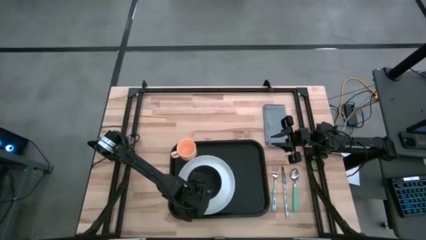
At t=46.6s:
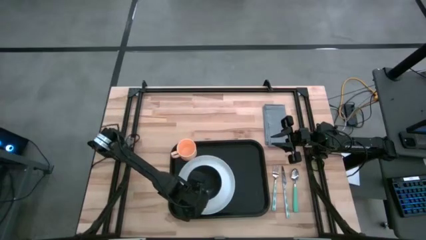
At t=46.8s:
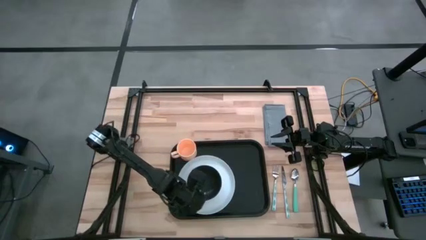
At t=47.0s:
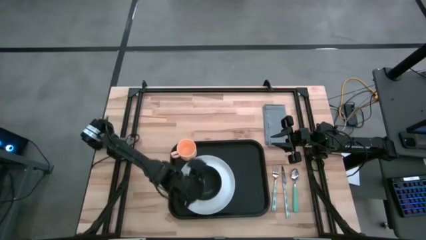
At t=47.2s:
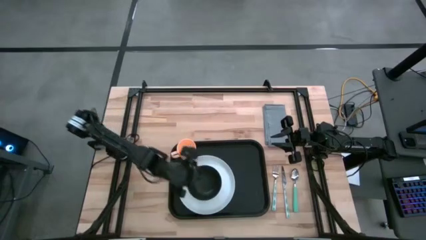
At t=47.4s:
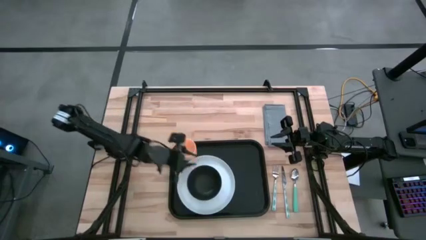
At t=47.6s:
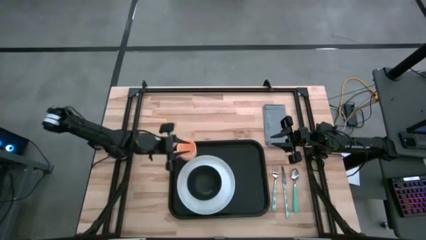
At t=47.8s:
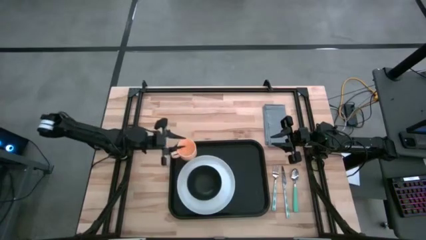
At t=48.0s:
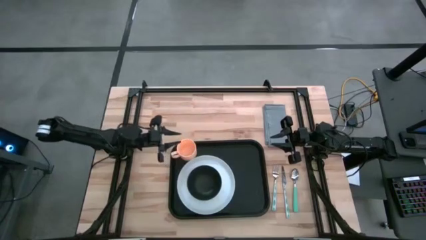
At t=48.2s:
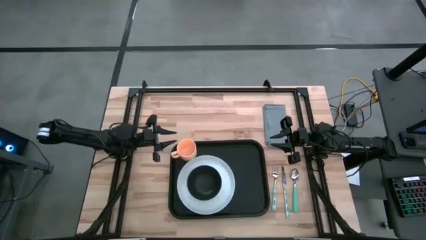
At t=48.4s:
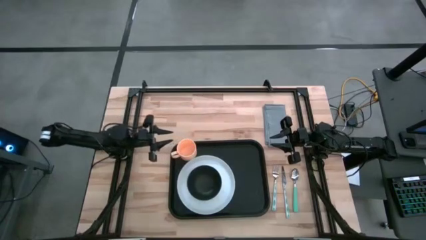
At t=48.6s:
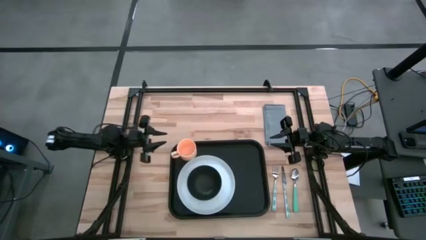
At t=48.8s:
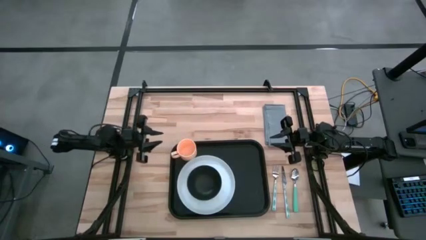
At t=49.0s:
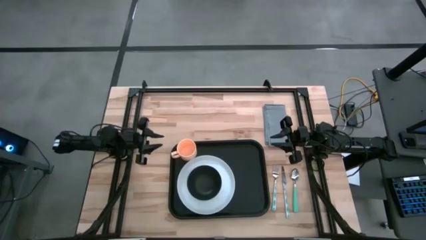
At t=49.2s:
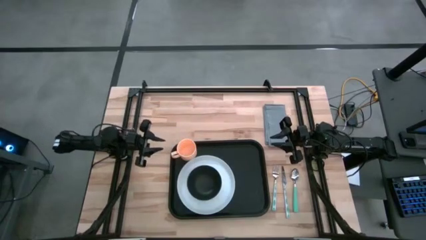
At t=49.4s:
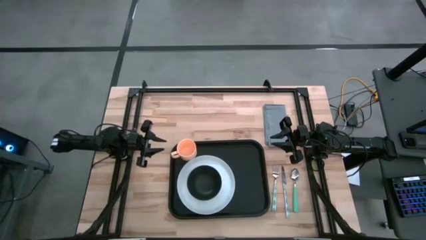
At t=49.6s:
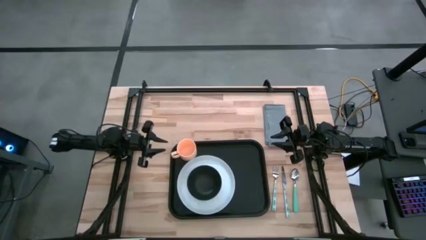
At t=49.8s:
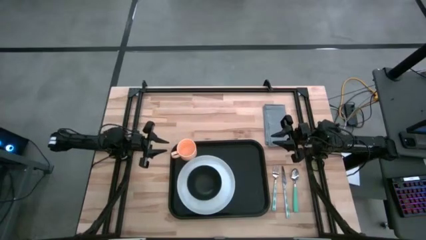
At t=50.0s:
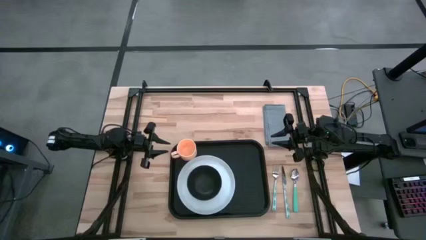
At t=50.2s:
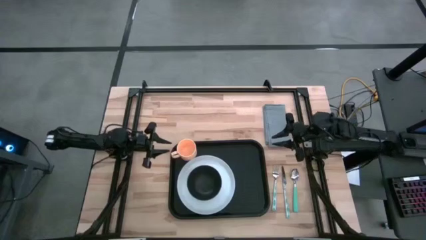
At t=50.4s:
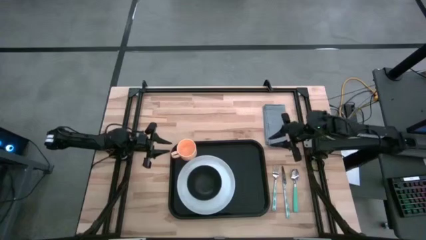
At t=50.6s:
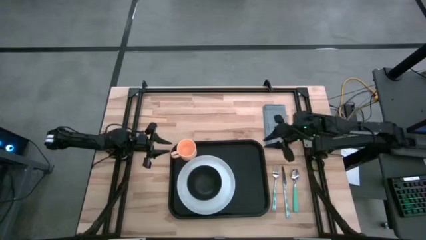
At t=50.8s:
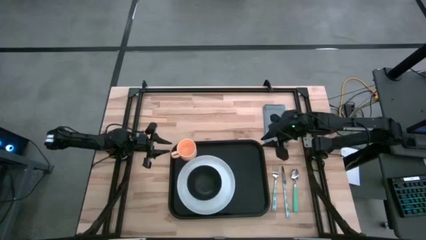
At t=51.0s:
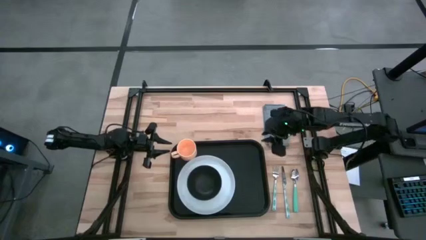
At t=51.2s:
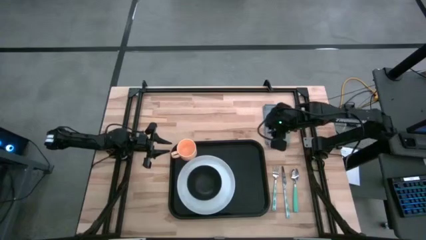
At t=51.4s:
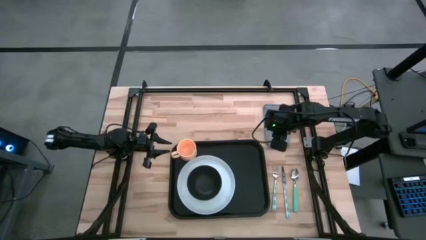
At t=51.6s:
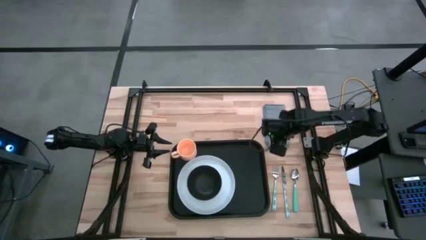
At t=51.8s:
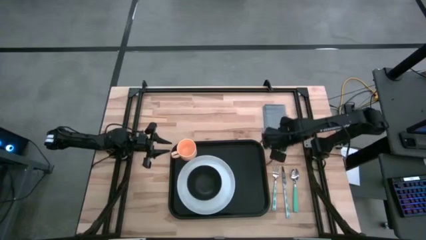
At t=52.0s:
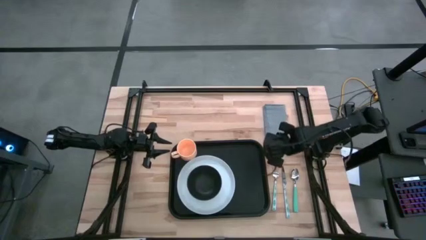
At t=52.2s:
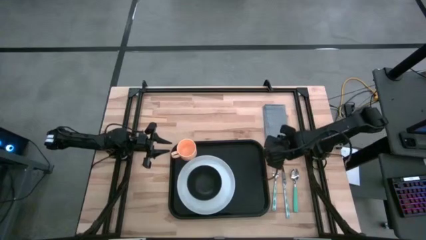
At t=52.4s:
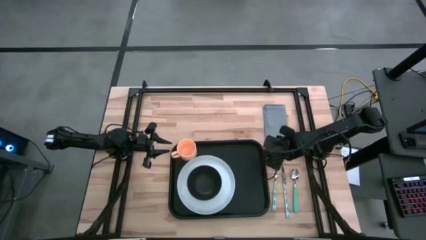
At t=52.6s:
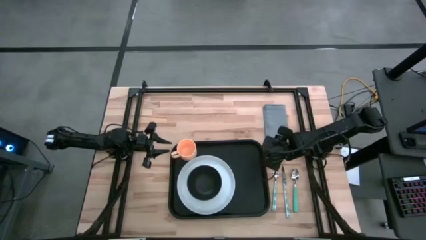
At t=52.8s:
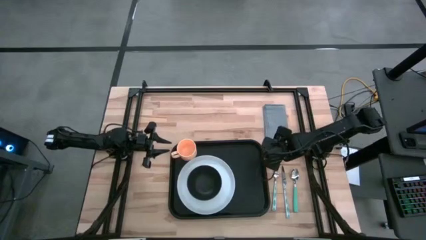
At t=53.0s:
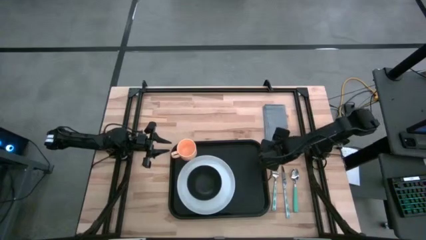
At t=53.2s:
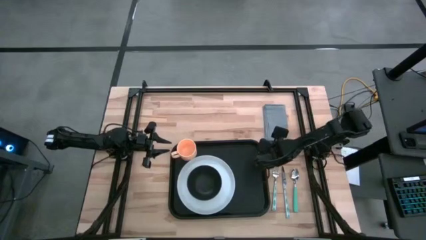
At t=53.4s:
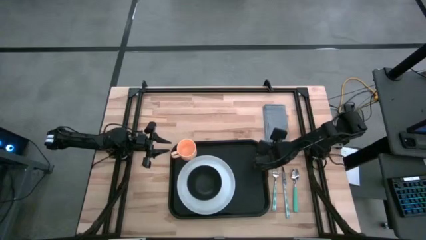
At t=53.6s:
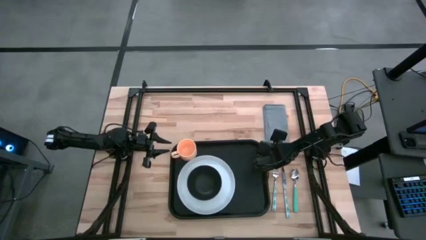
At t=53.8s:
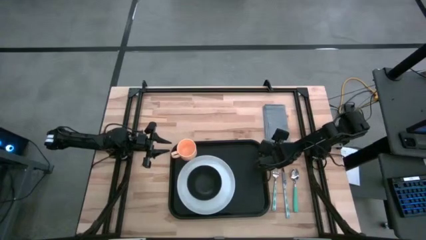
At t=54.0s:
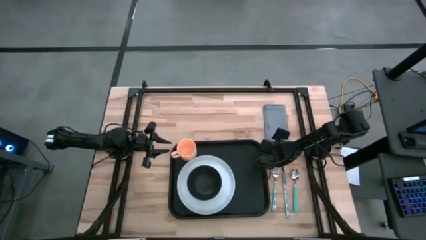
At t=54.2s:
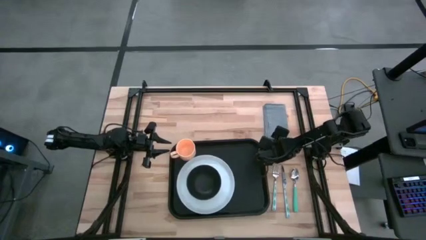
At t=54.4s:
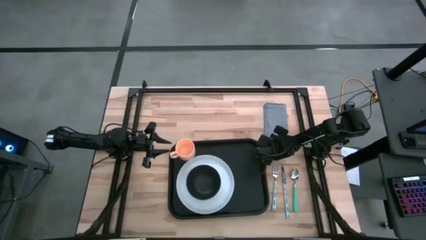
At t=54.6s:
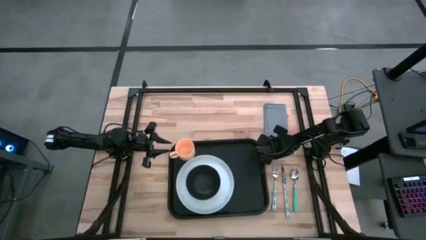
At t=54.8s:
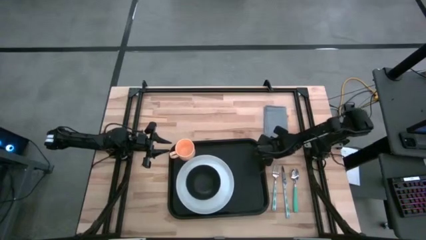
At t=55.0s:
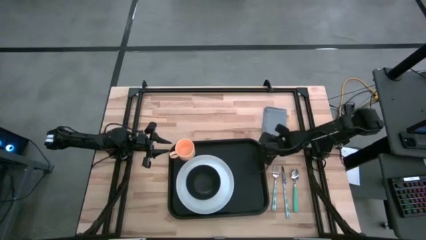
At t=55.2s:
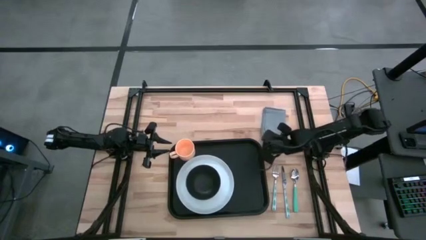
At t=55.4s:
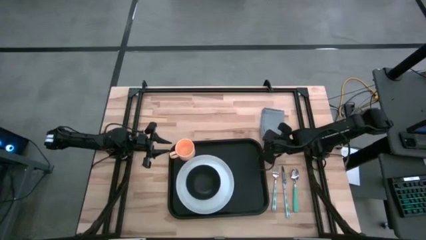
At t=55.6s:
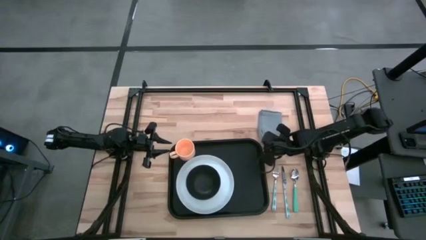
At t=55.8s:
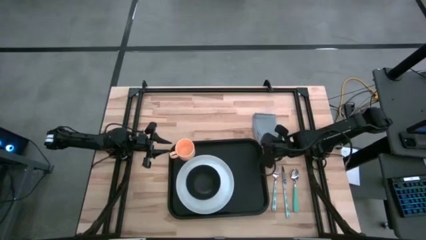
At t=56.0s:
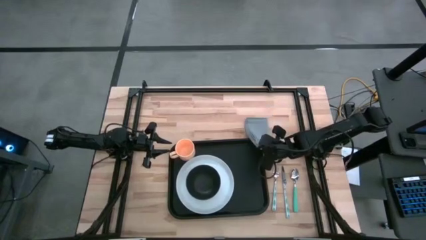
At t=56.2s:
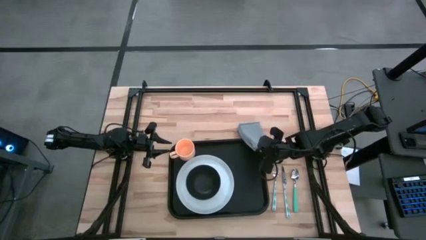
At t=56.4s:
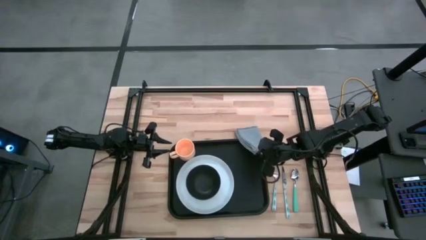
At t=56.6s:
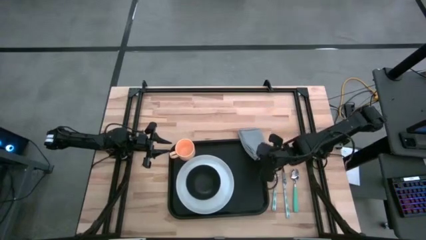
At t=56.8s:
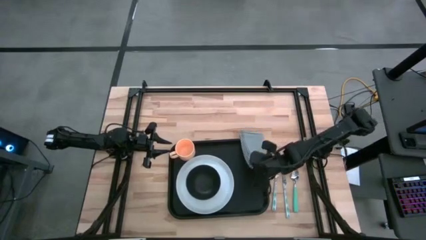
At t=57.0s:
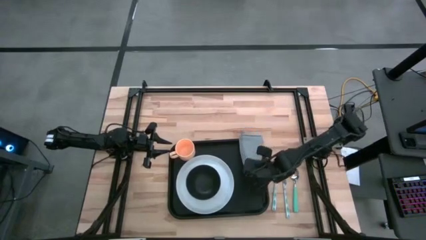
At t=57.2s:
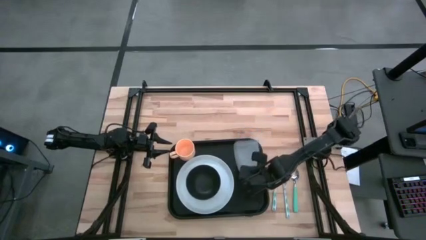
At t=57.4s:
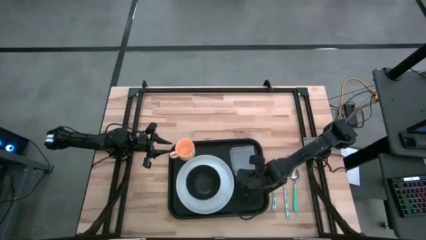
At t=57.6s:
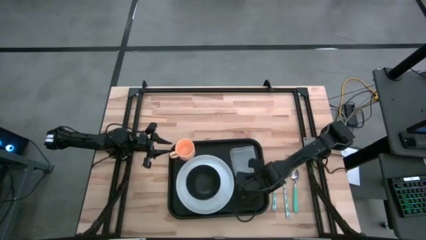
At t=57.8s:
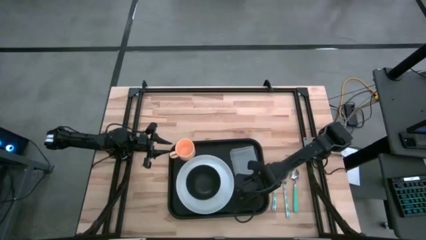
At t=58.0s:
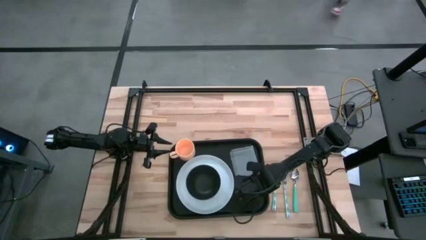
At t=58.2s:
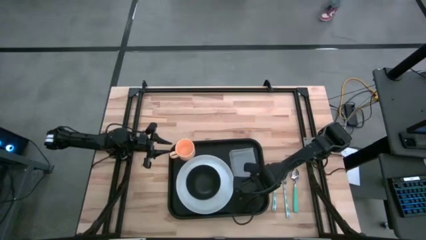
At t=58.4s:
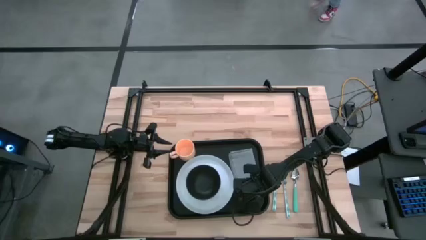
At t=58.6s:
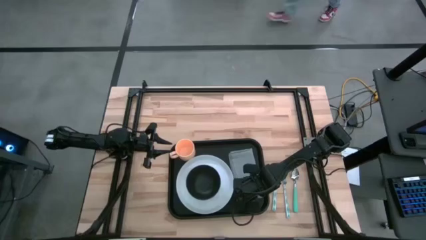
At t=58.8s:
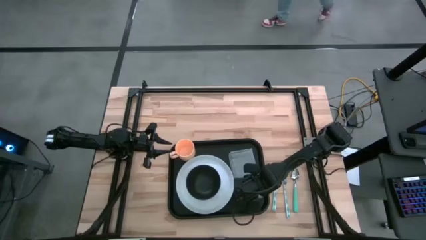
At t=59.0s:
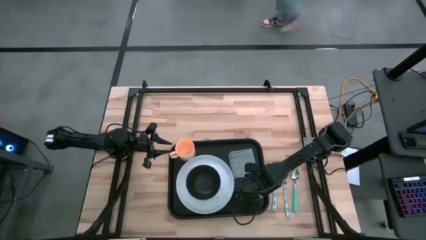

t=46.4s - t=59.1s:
Task: Set up tray
Put the gray napkin on the black serving tray right of the white plate

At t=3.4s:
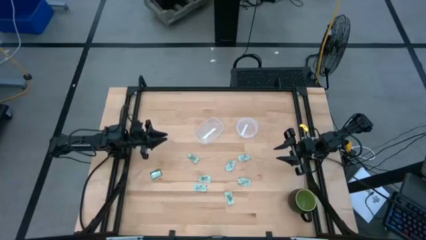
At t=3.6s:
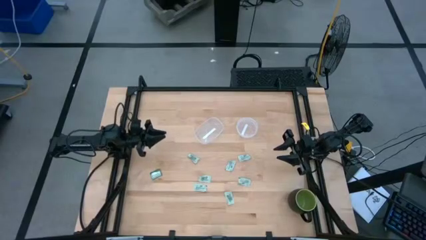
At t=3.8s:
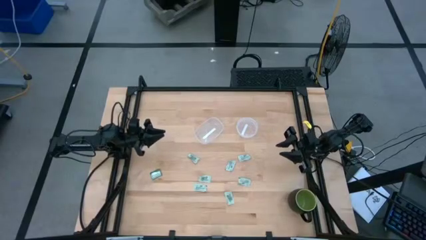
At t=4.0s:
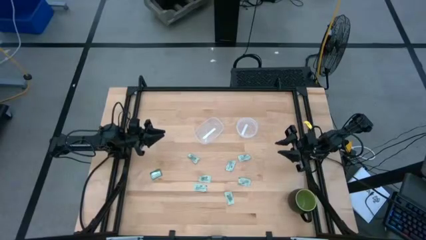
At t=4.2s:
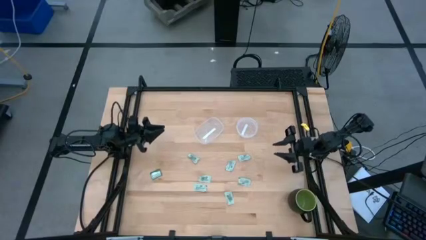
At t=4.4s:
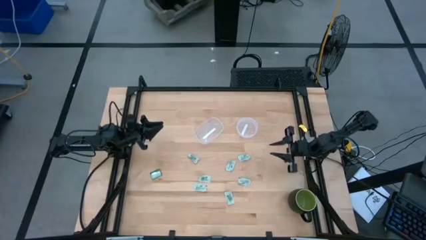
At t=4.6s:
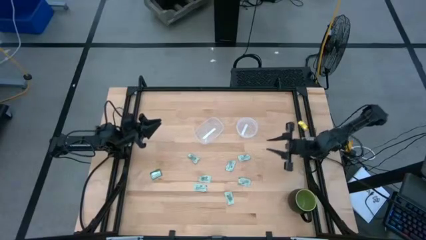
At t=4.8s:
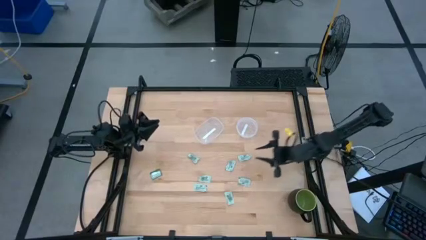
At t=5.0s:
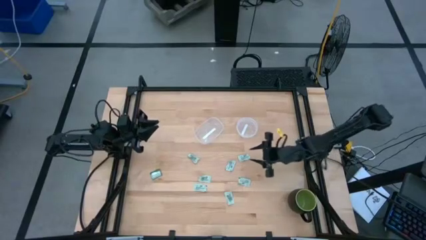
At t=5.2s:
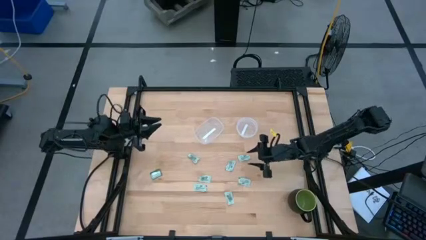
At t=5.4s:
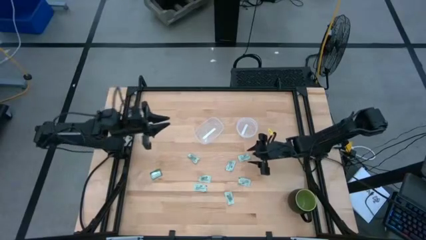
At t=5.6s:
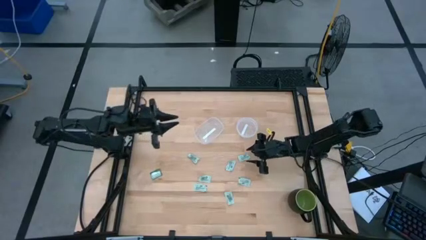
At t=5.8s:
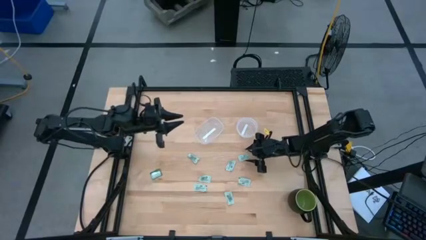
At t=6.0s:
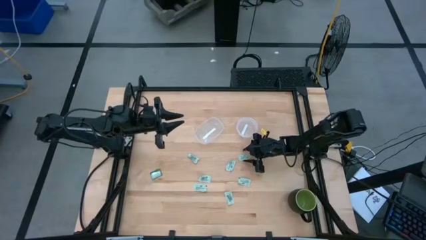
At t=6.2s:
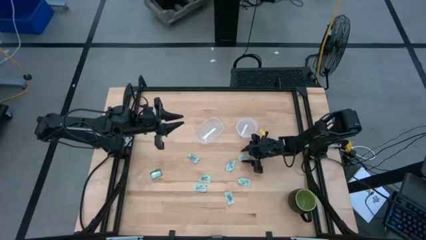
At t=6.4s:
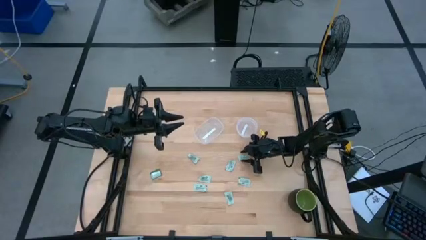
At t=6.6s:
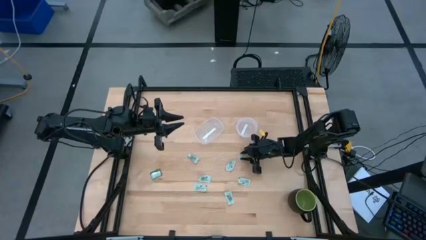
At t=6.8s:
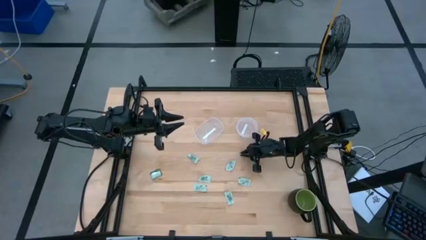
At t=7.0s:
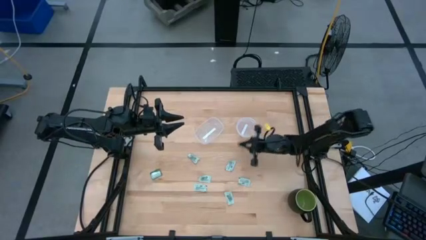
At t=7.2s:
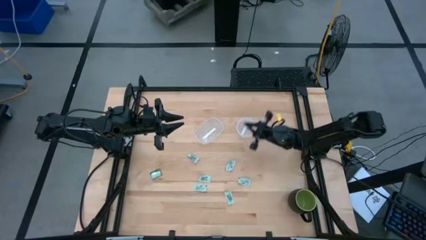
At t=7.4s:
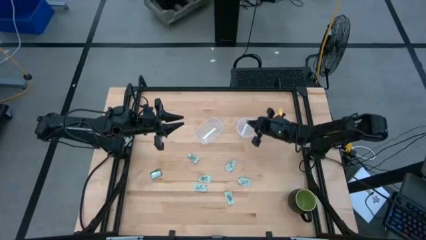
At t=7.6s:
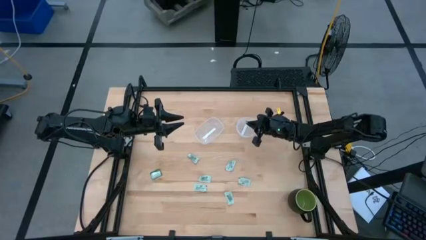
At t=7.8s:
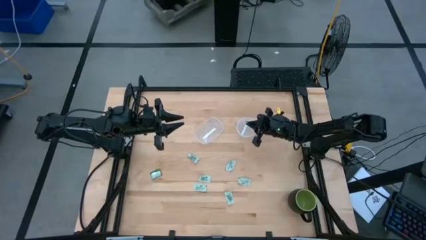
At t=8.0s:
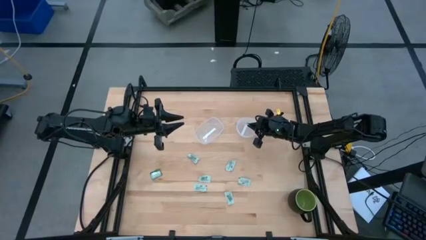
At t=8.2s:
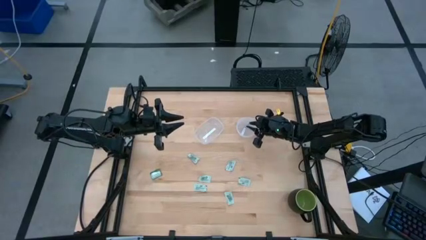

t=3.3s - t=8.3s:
Task: Pick and place Stevia / Truvia into bins
Put the stevia packet into the right transparent container
